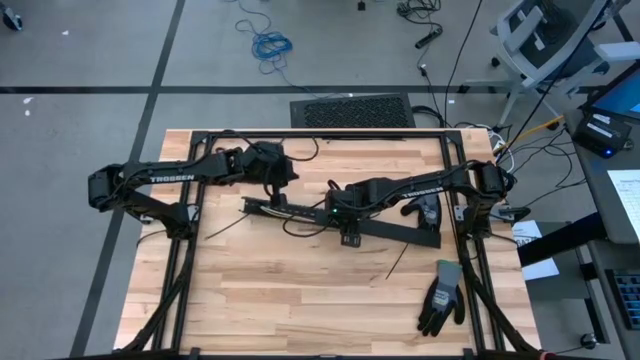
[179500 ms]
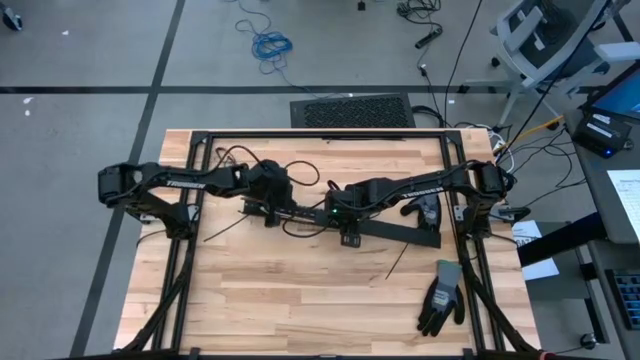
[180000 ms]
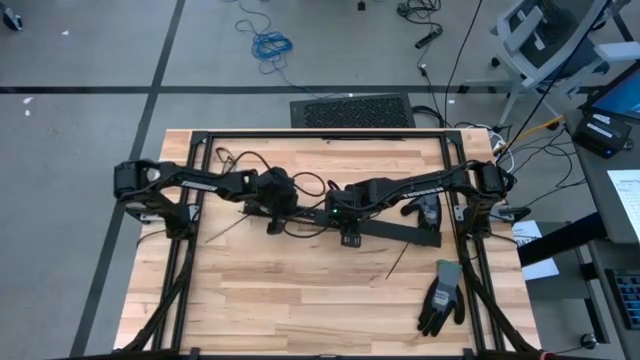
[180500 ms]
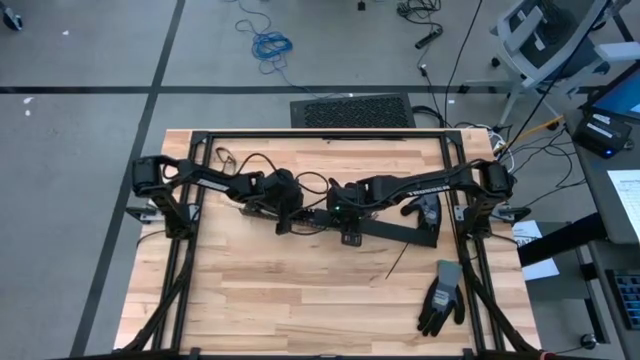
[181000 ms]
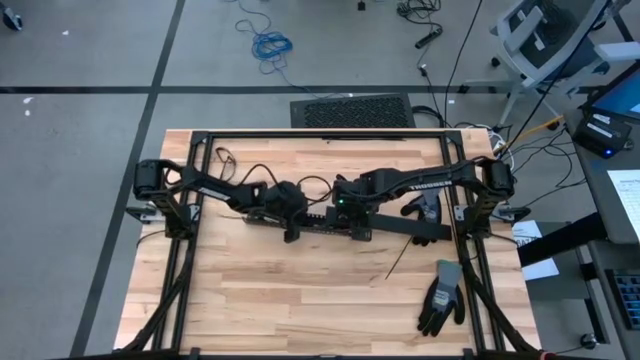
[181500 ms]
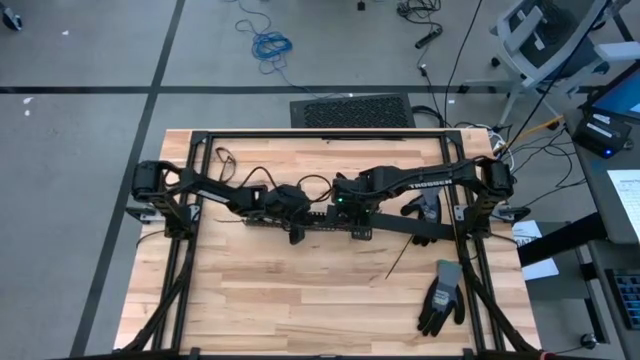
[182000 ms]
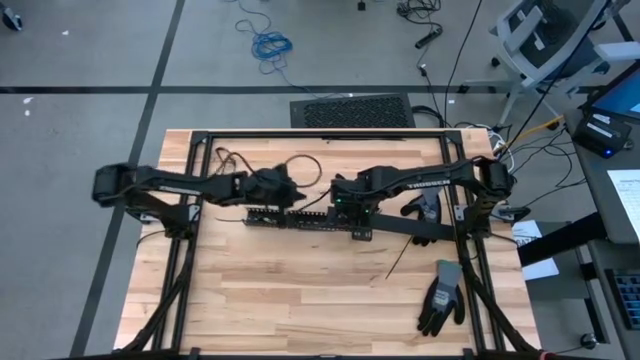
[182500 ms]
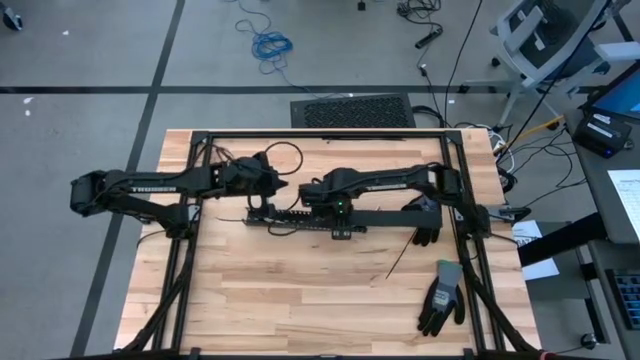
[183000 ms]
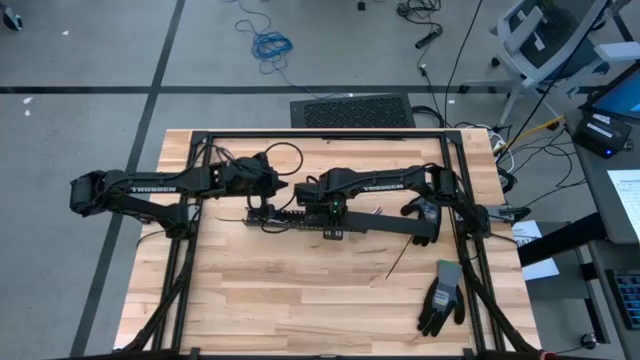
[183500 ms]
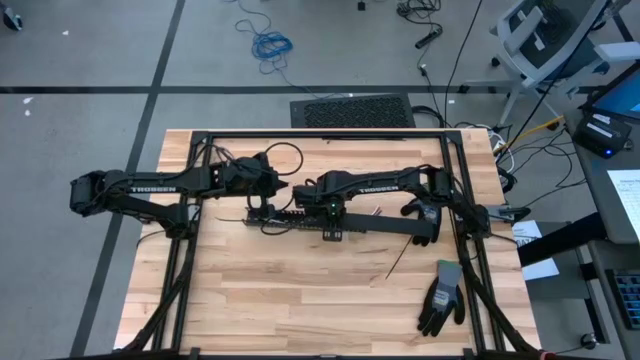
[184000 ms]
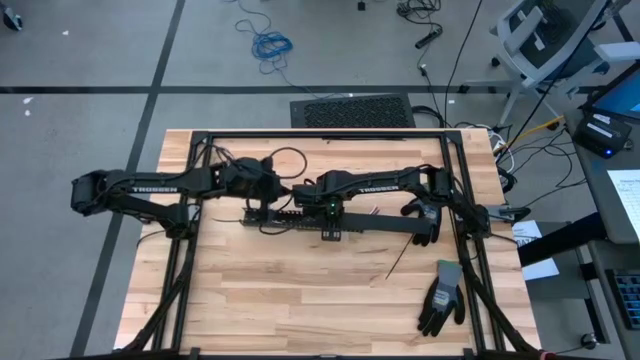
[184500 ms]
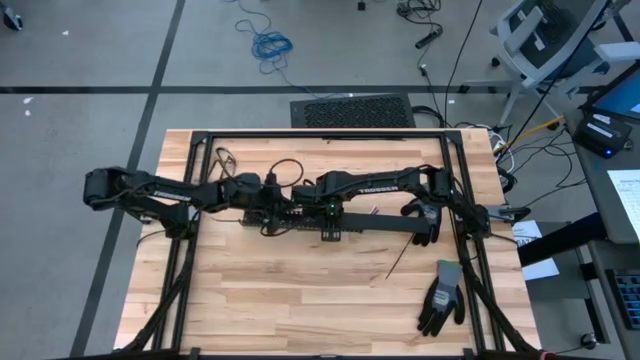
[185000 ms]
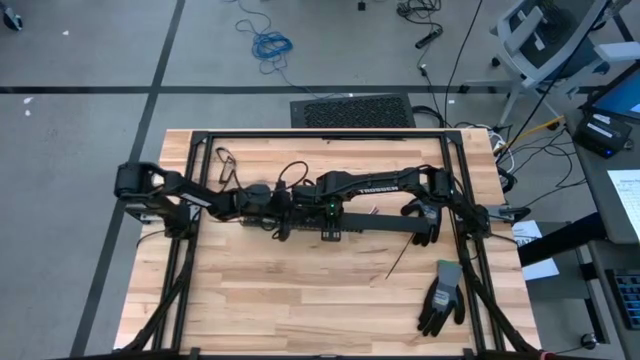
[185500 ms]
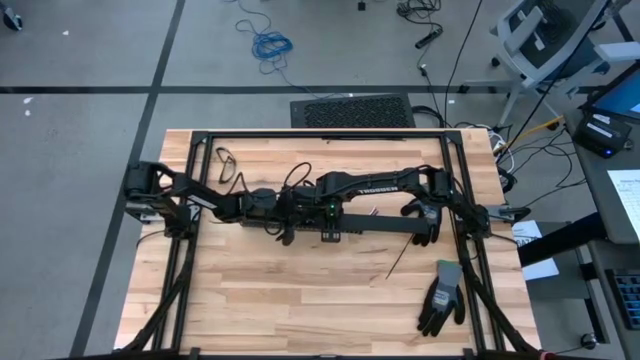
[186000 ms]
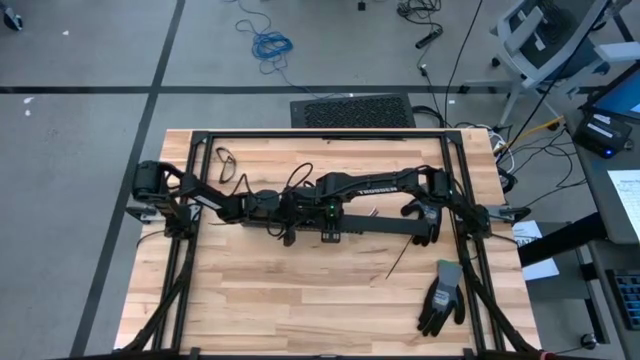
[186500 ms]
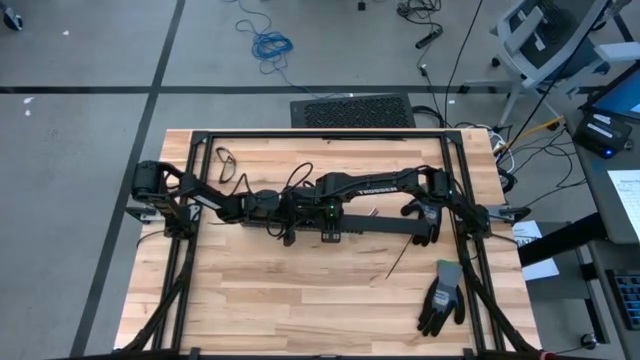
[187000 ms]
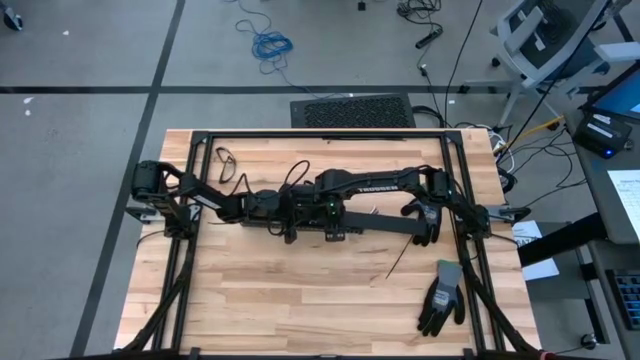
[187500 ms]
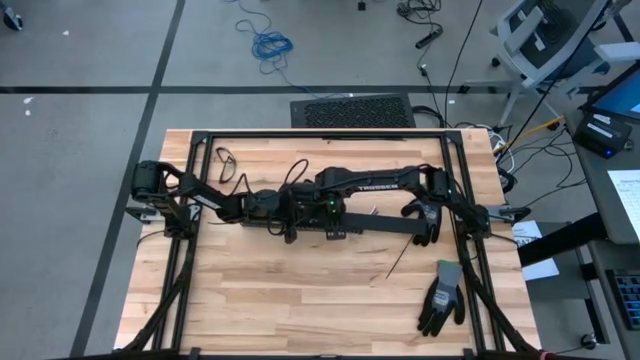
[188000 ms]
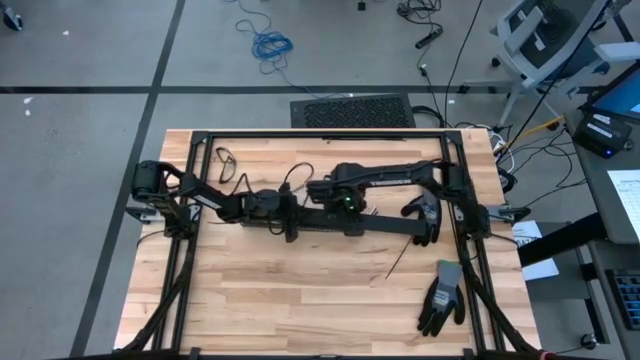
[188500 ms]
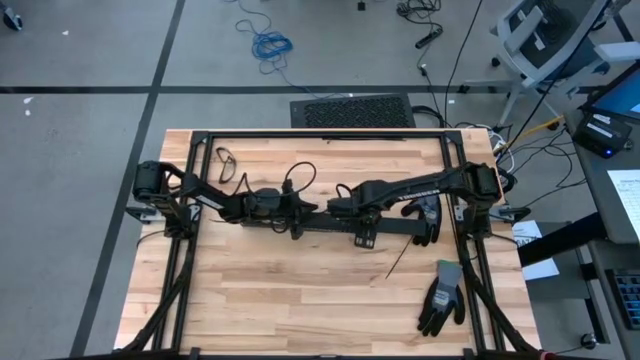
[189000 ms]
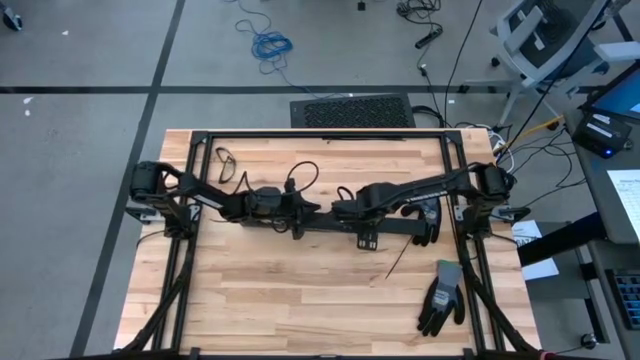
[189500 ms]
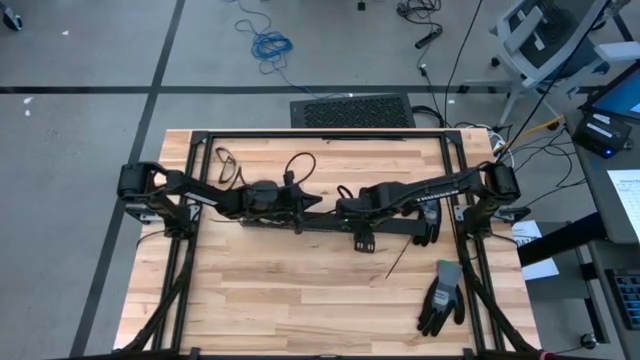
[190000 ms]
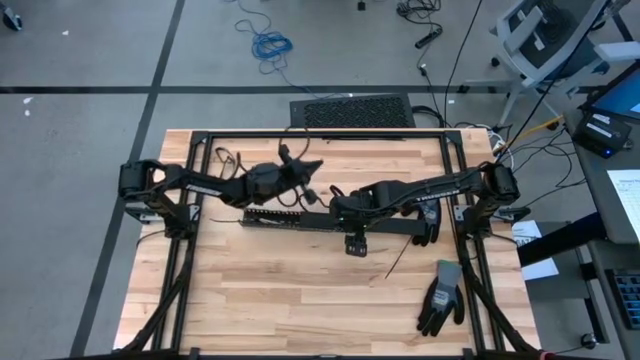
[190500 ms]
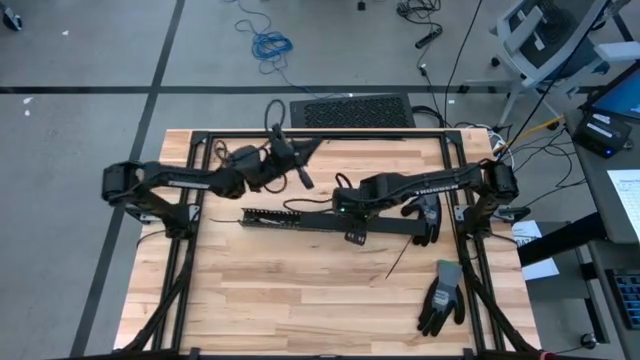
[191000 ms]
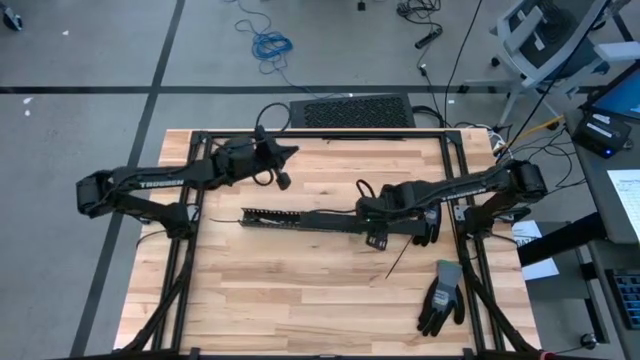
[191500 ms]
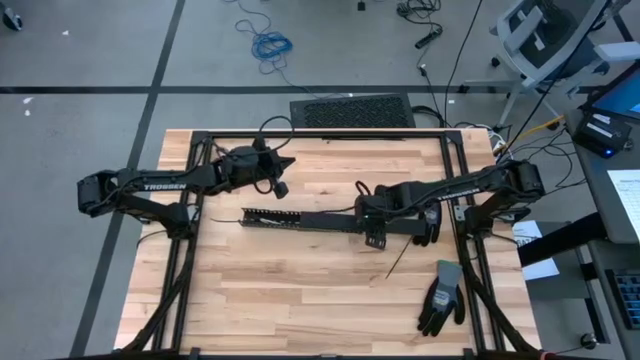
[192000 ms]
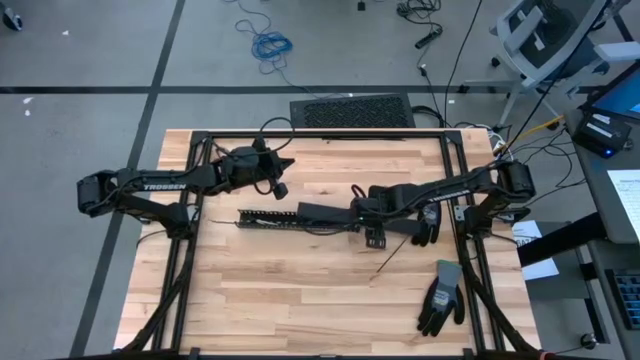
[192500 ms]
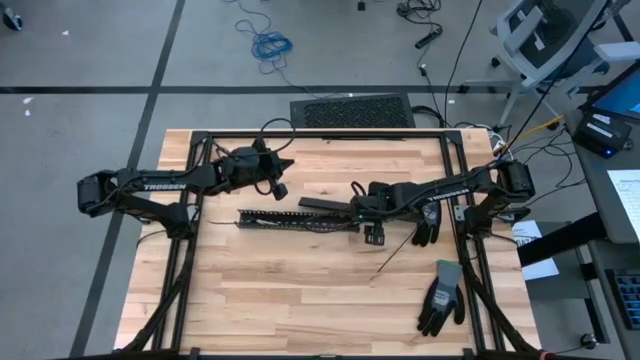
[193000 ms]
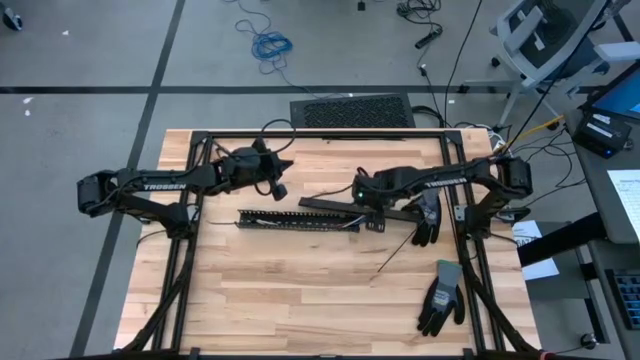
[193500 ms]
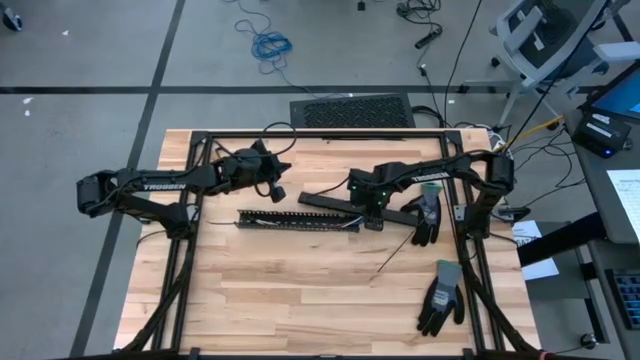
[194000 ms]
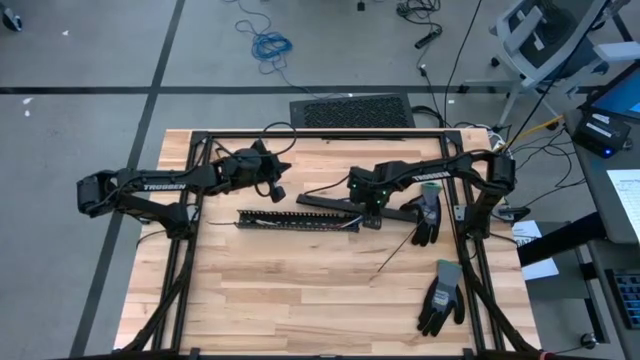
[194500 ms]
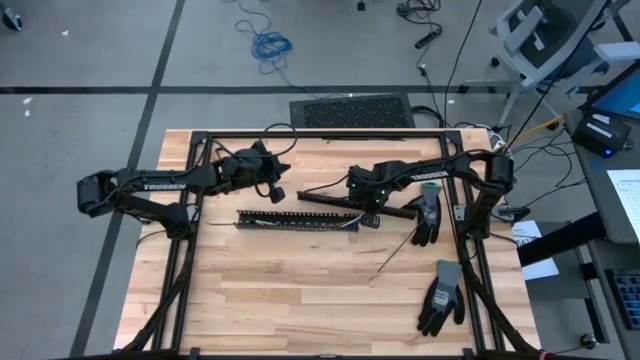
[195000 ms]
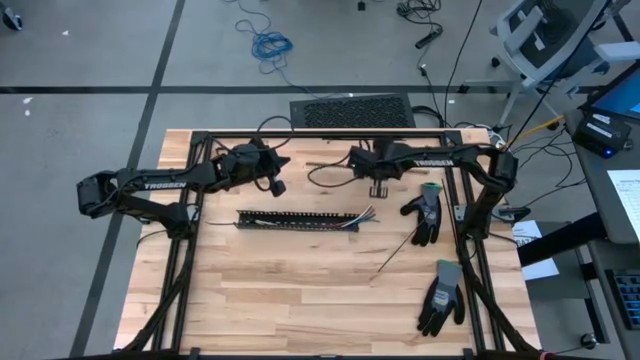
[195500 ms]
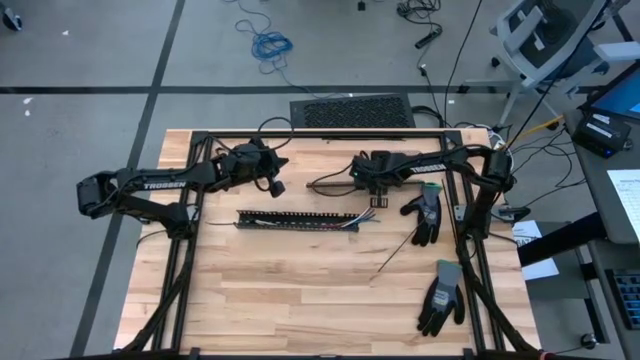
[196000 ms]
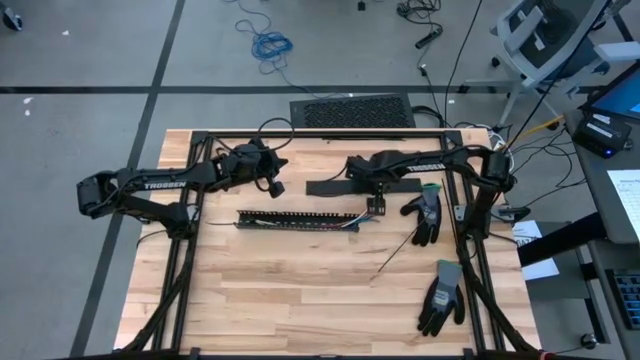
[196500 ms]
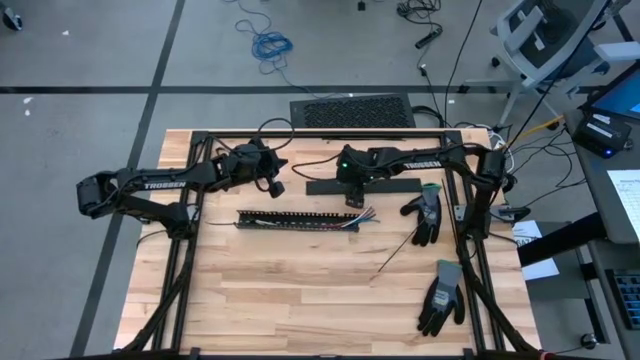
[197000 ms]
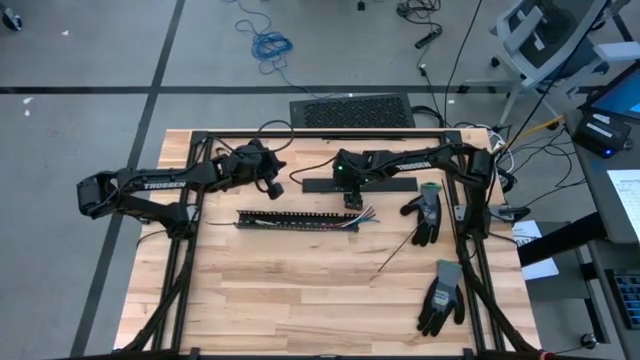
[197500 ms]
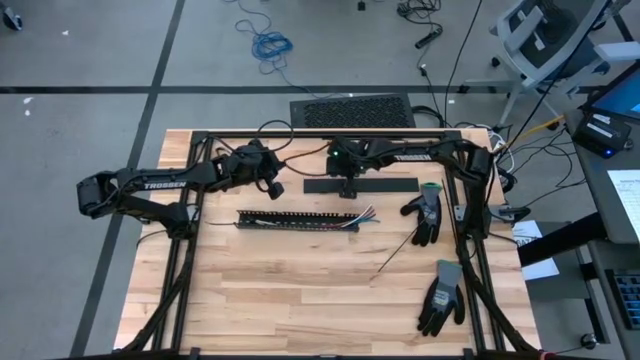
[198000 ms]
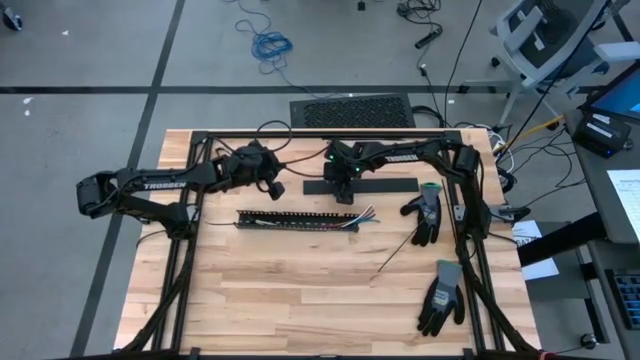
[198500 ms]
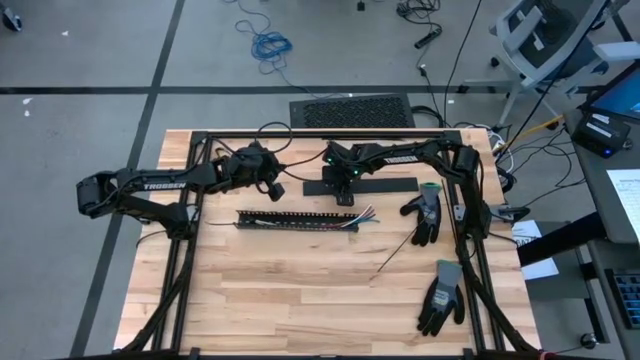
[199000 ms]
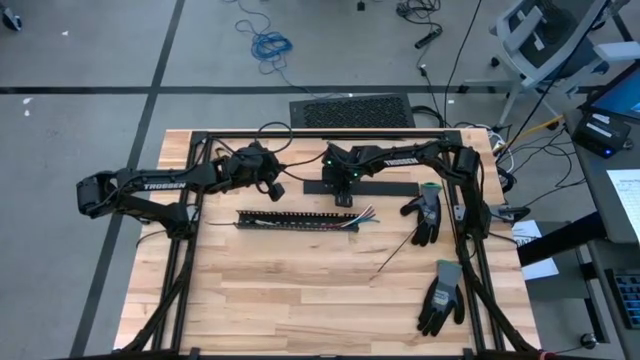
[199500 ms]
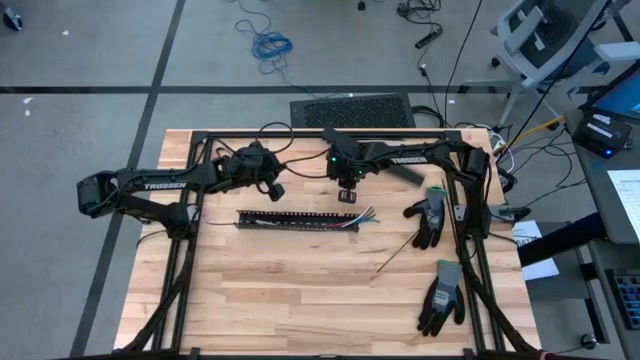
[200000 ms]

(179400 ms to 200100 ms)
Task: Ziptie cables
Close the black cable duct cover

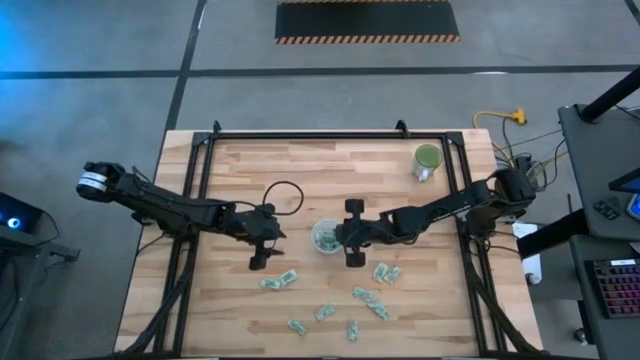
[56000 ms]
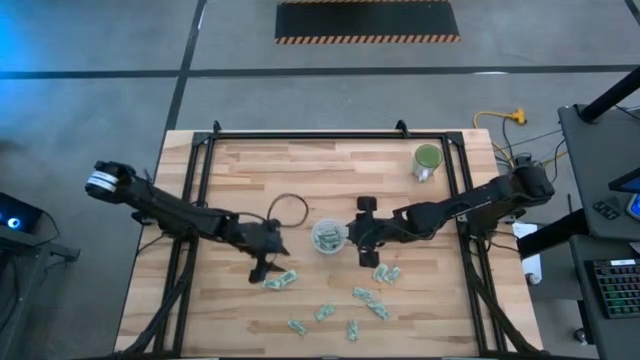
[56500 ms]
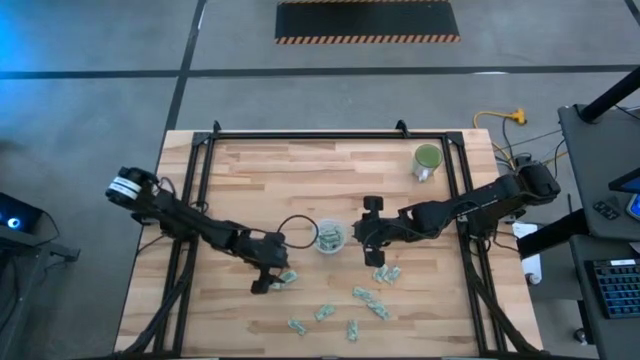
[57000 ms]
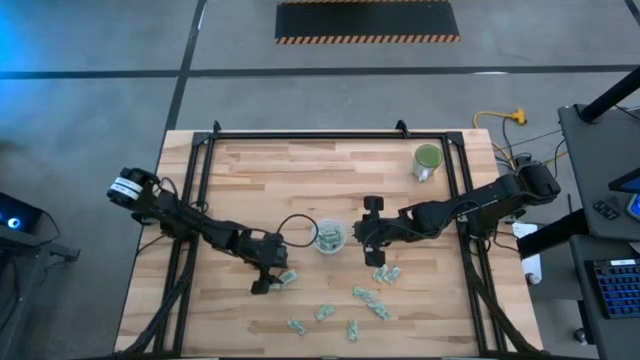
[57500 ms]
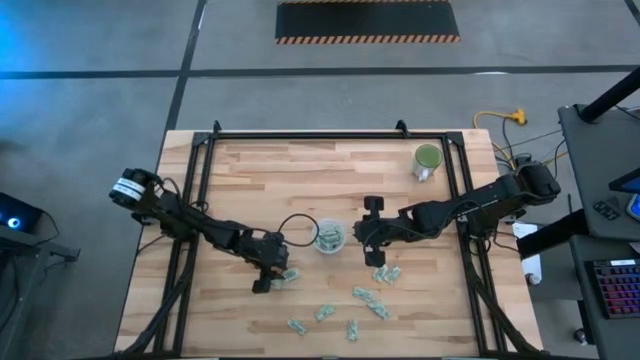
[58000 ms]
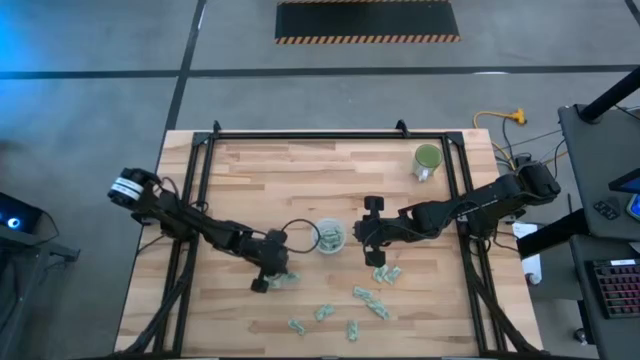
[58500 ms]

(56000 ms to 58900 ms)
Task: Pick and place Stevia / Truvia into bins
Put the light green stevia packet into the transparent container
